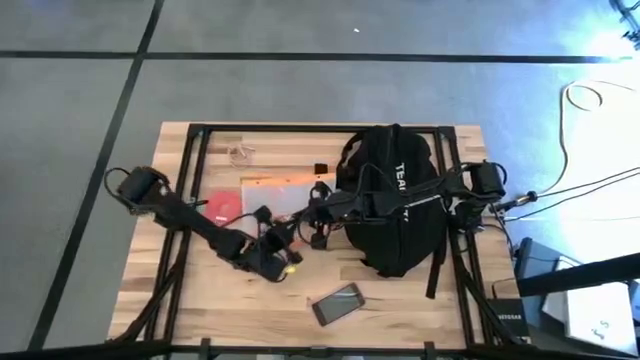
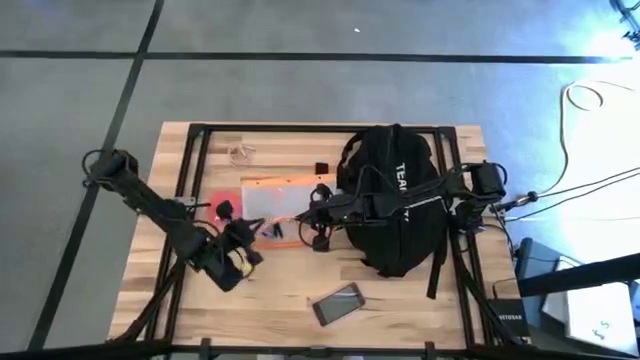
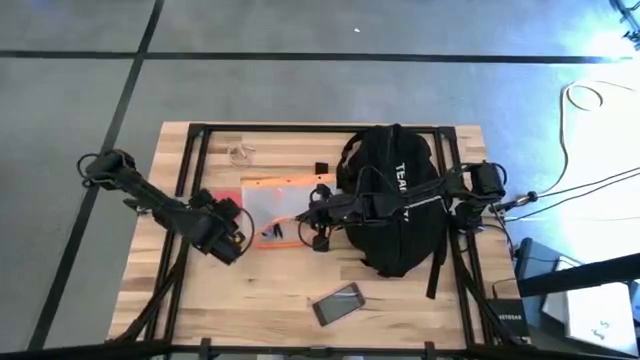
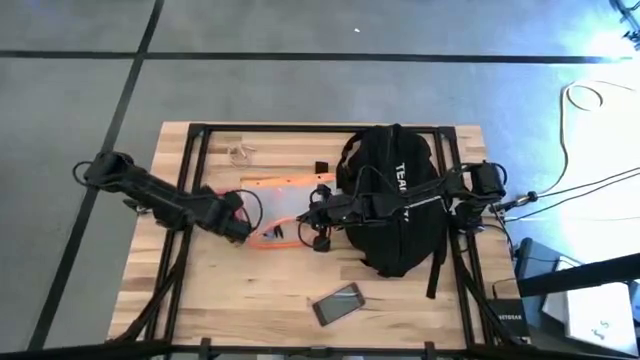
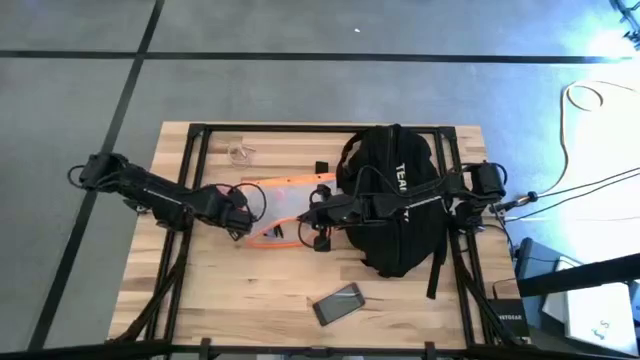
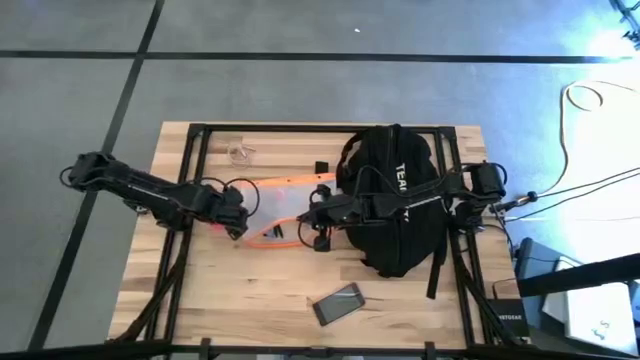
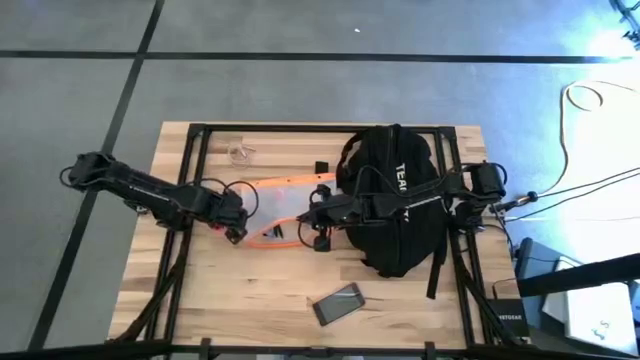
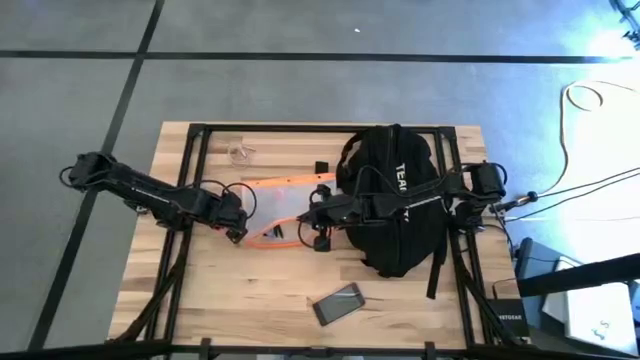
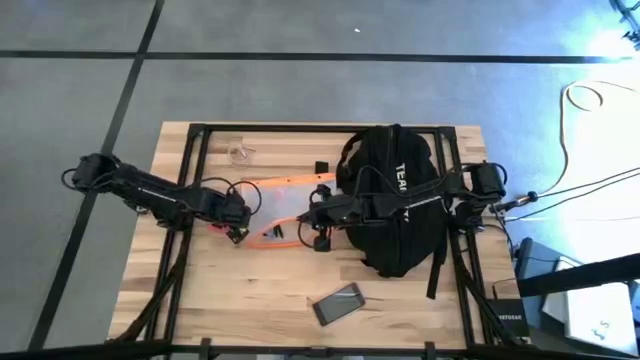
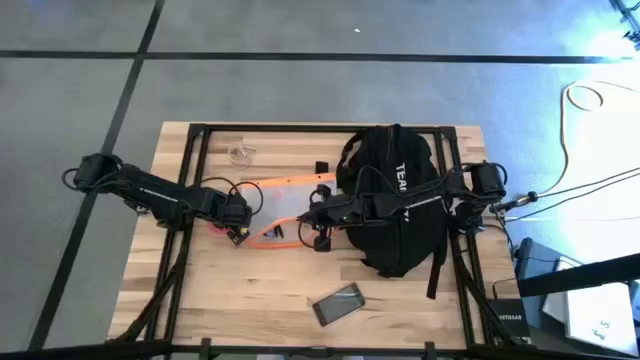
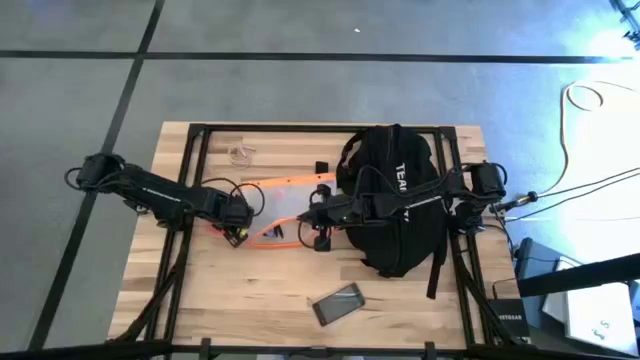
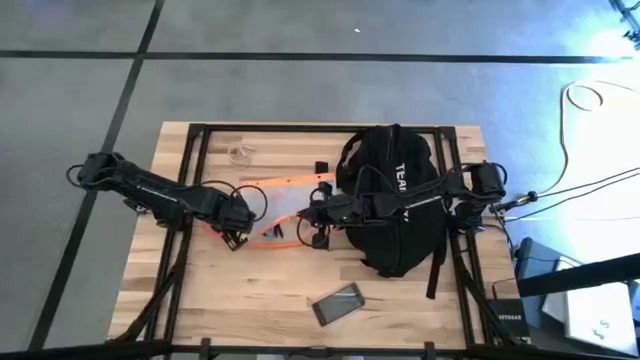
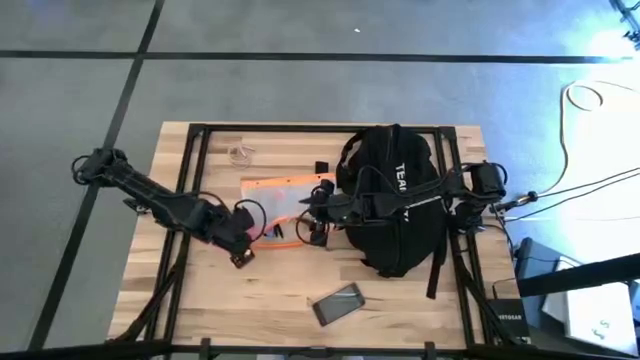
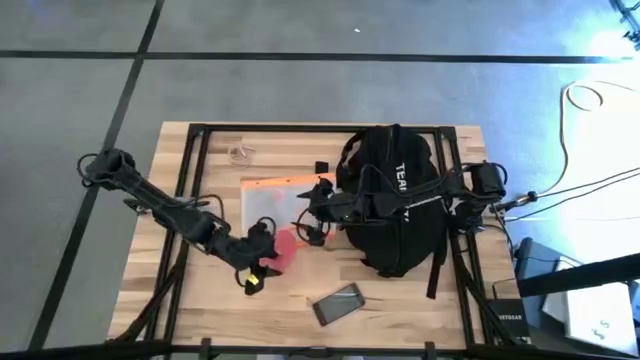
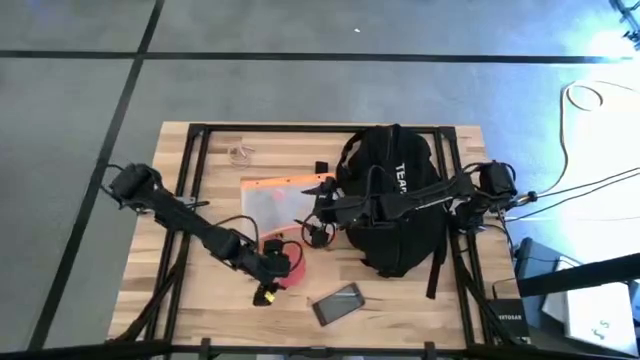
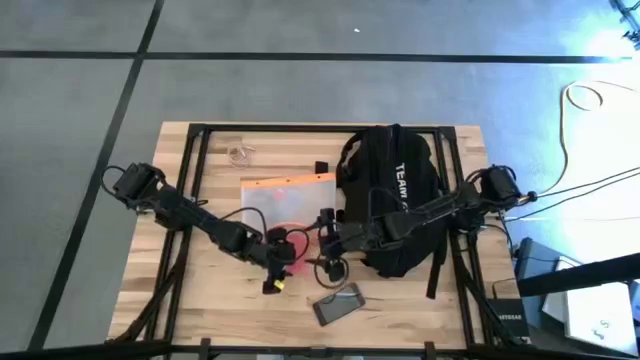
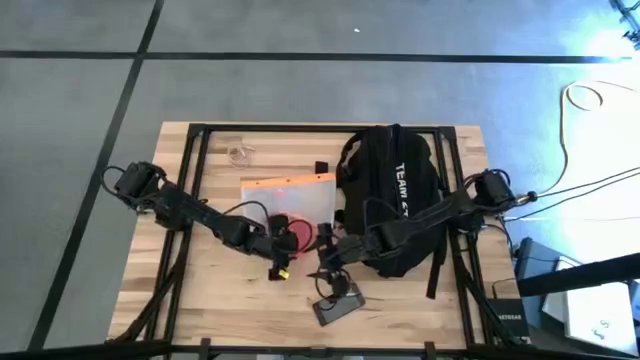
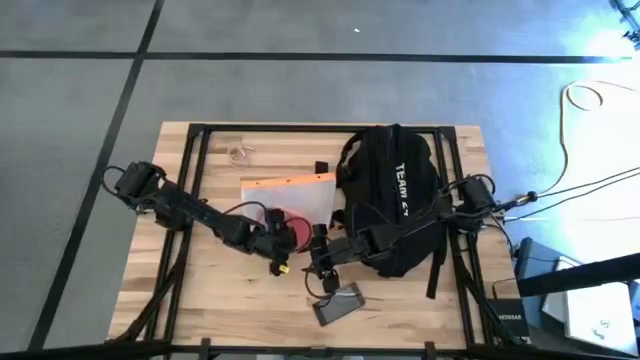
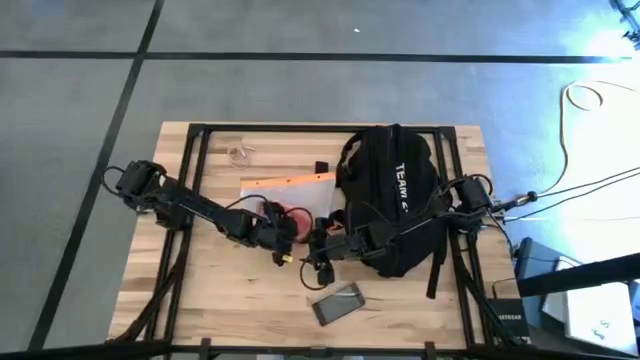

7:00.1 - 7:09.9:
Task: Unpack backpack
Put the pink medicine organizer into the transparent white zip bag

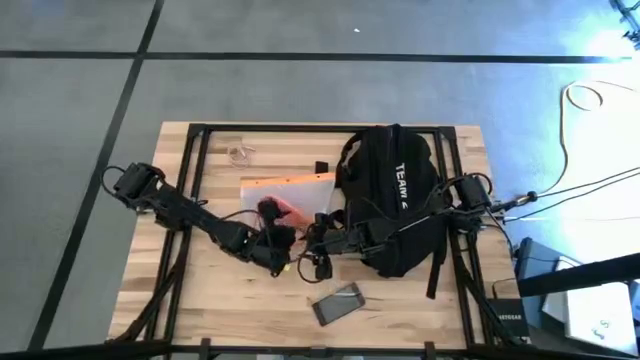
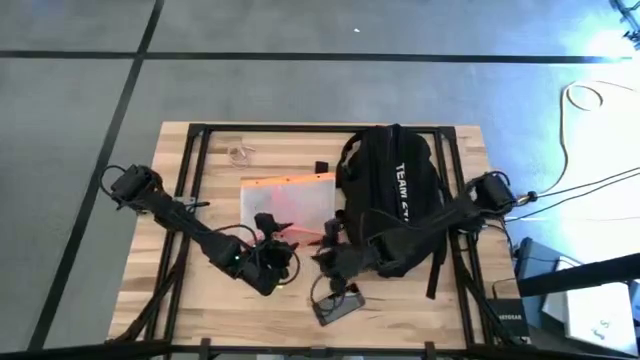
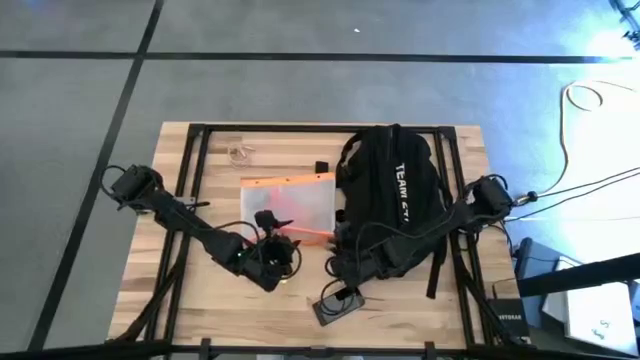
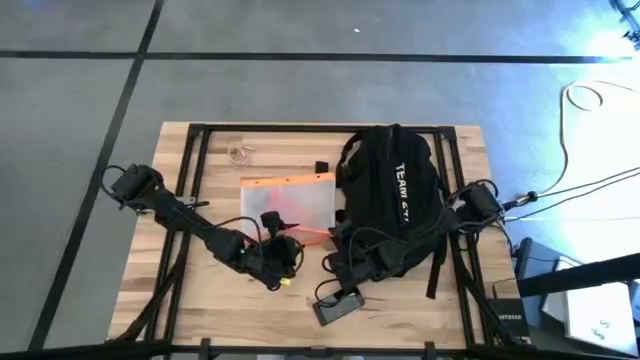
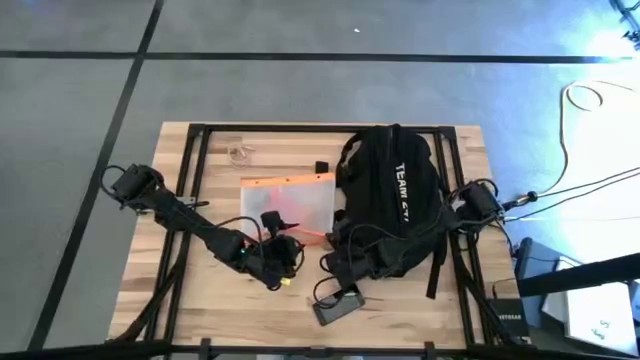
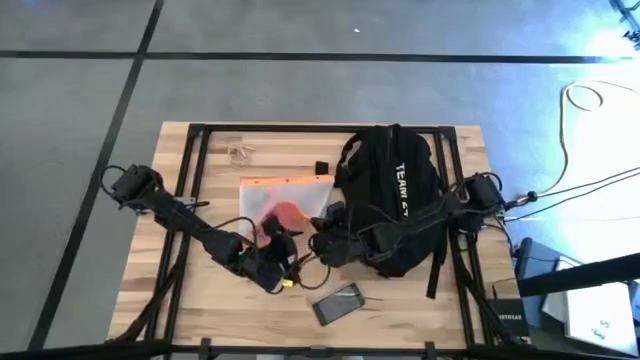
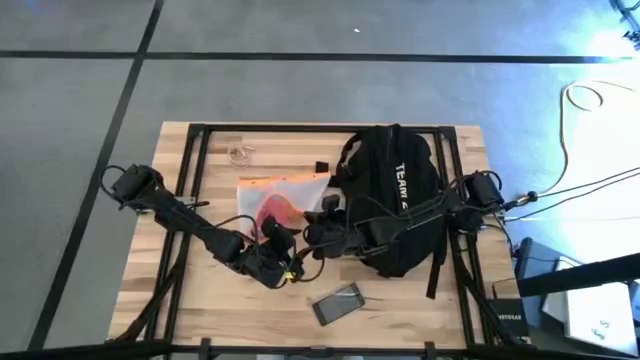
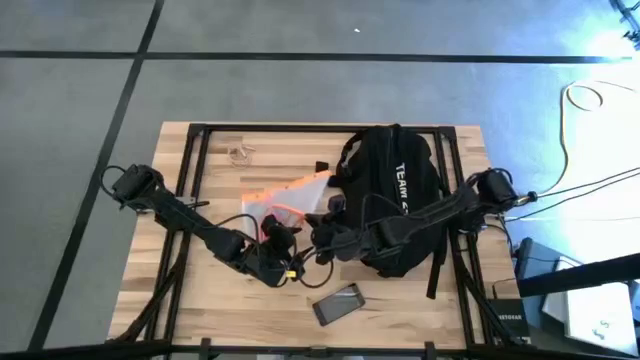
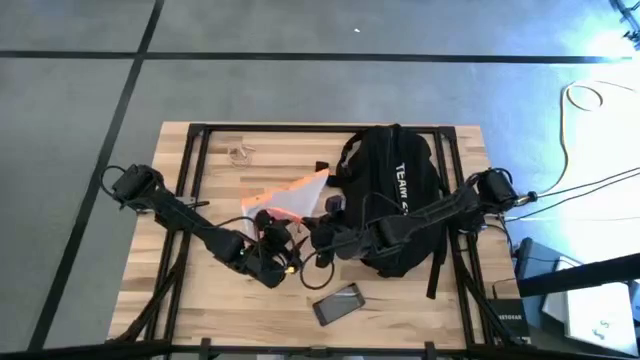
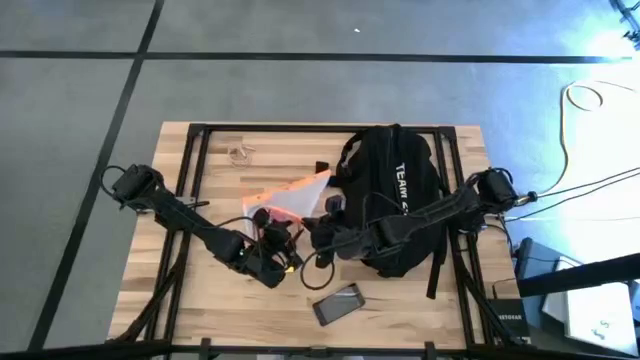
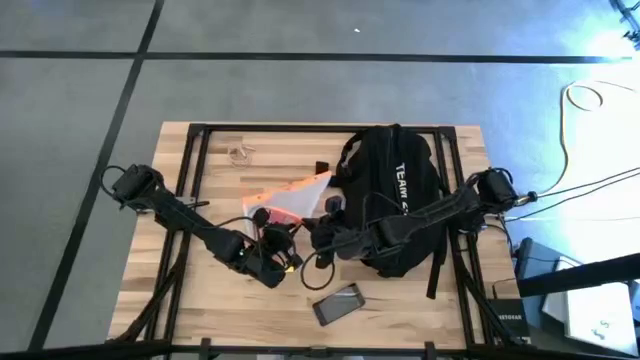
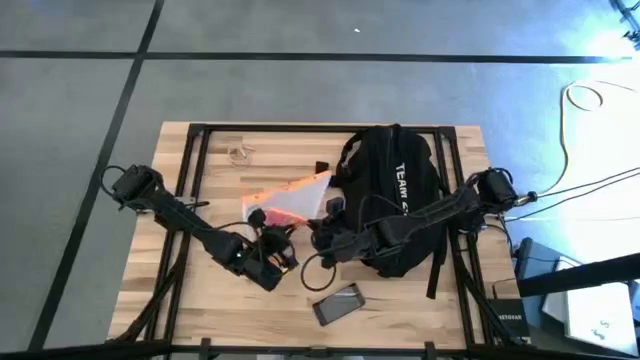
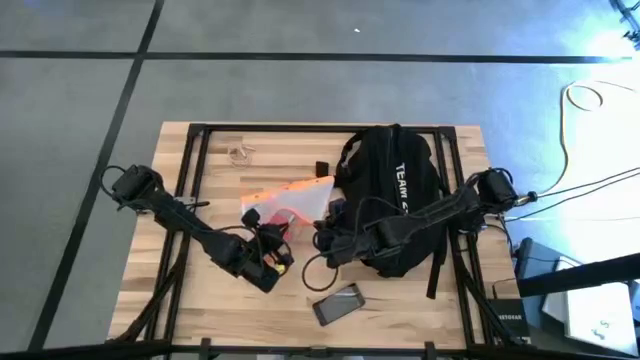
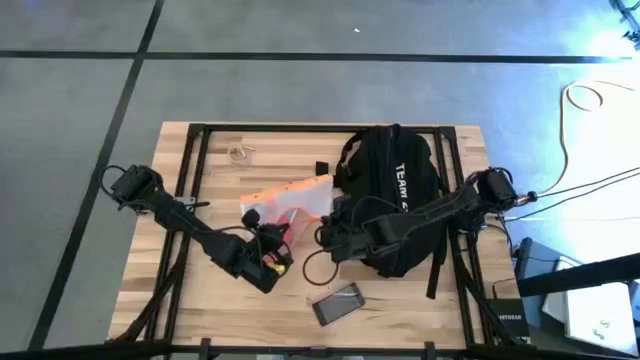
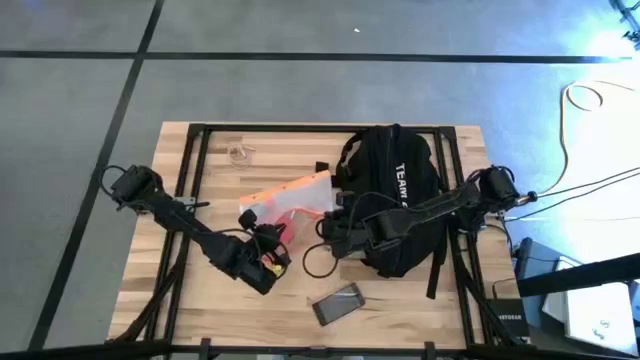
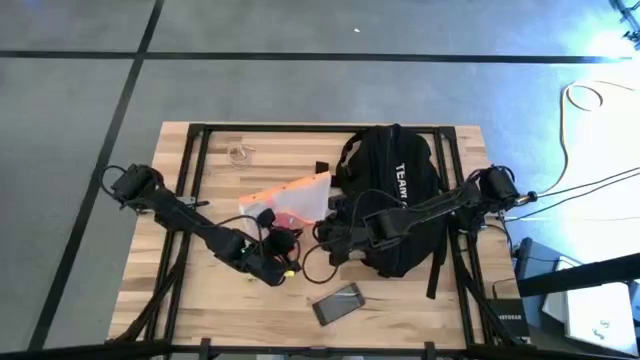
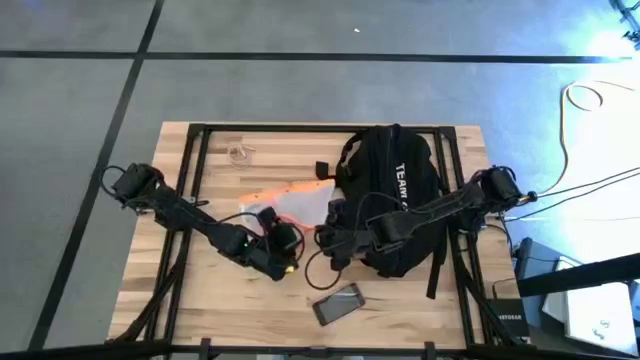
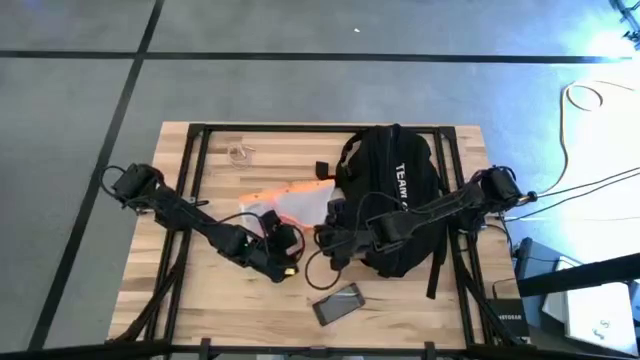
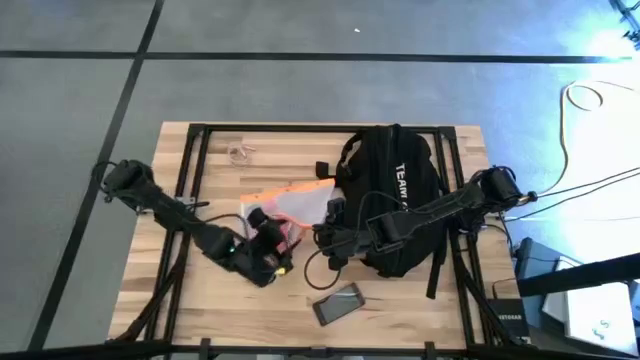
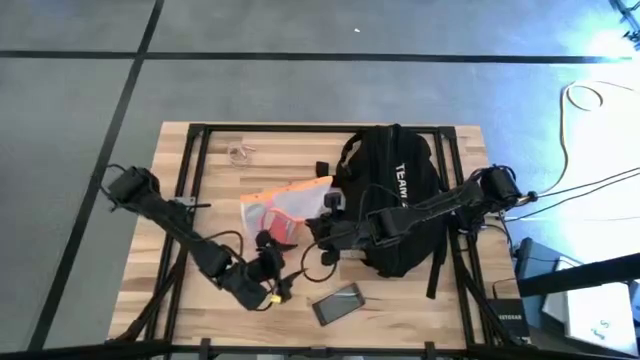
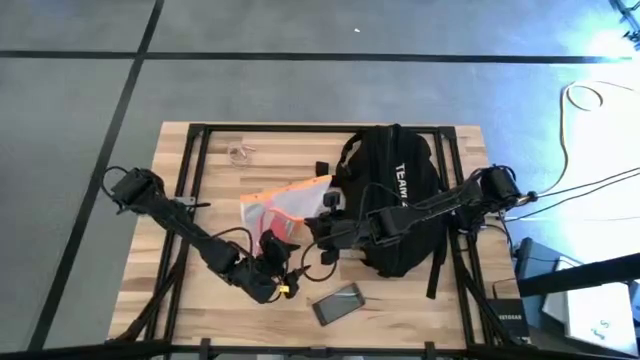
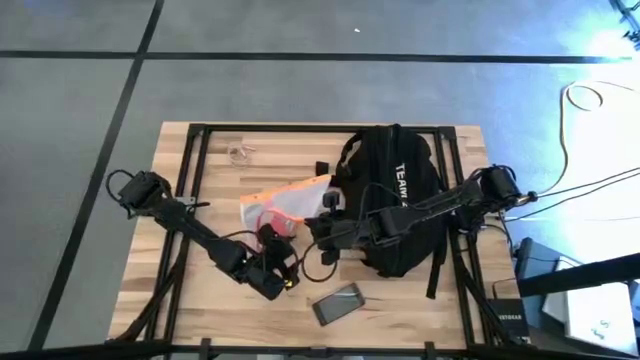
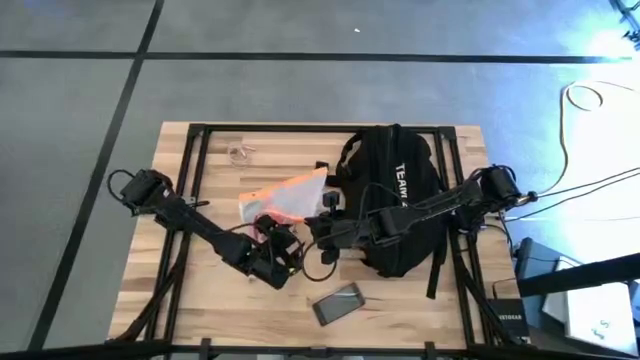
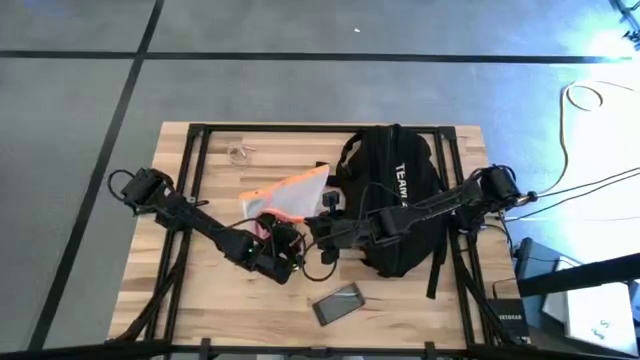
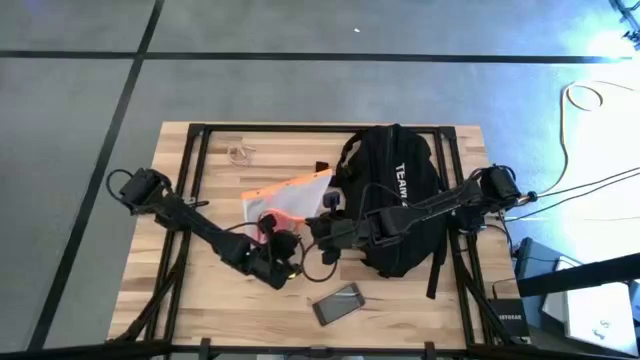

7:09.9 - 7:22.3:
Close the transparent white zip bag

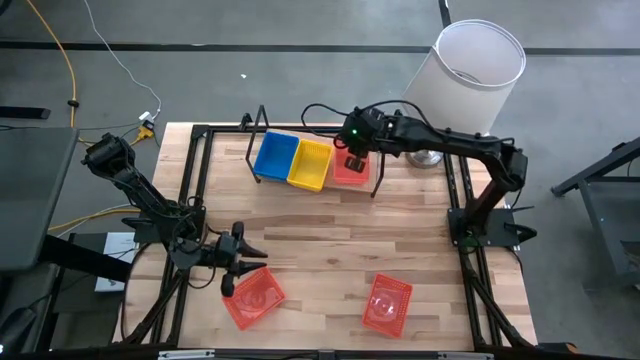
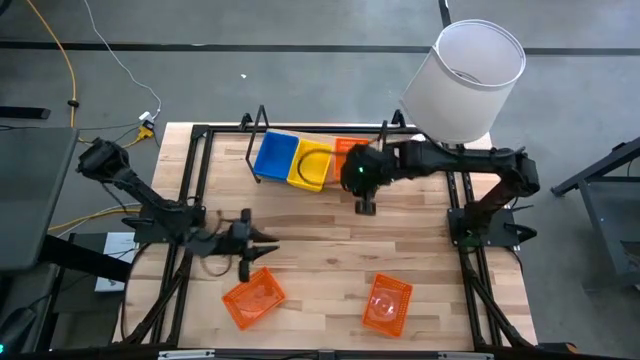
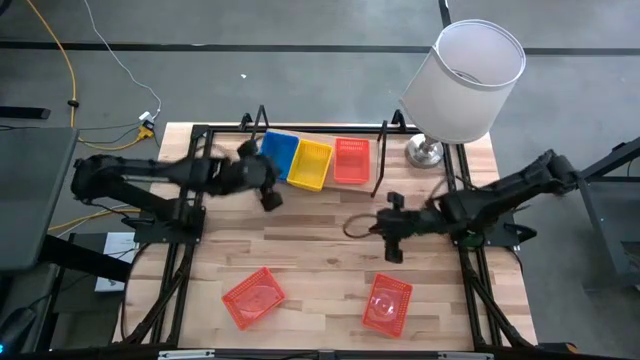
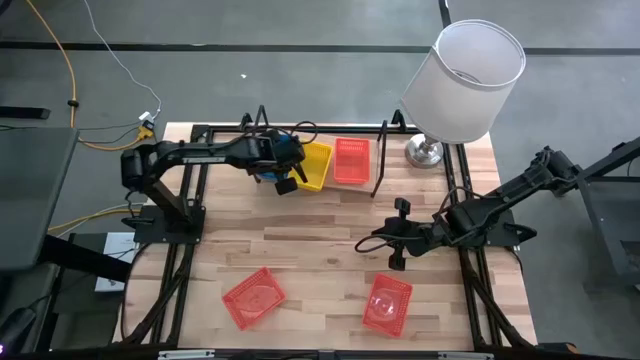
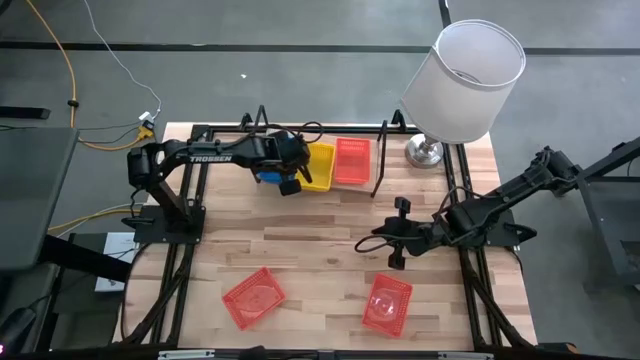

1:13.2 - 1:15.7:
Task: Stack baskets on shelf by color
Adjust the stacked blue bins on the shelf
